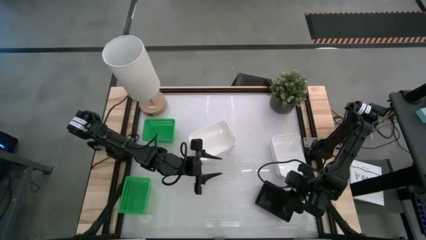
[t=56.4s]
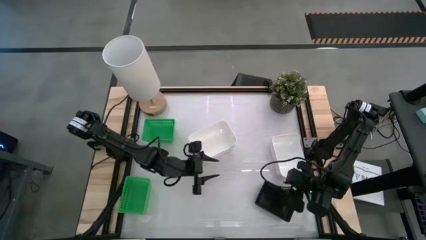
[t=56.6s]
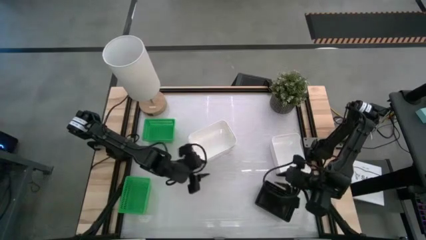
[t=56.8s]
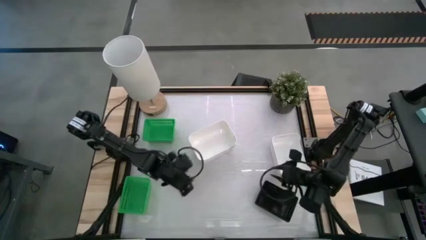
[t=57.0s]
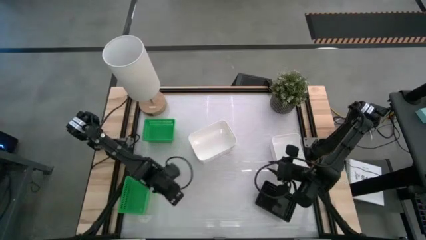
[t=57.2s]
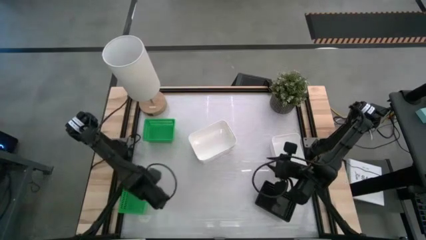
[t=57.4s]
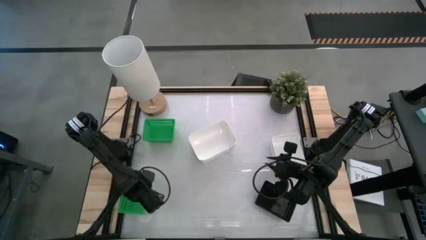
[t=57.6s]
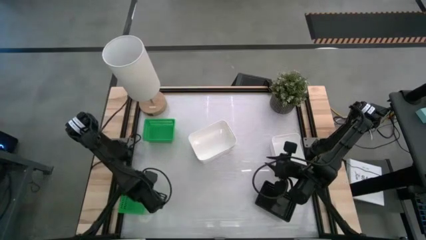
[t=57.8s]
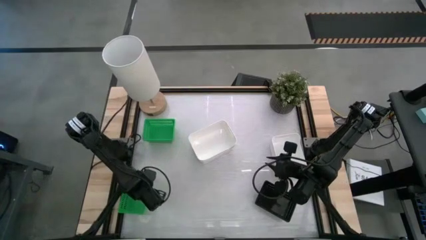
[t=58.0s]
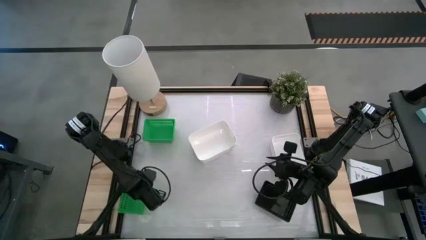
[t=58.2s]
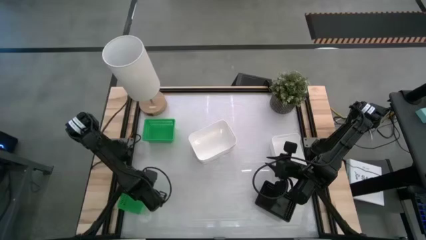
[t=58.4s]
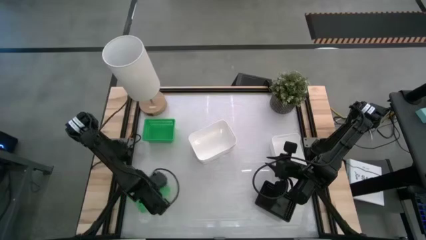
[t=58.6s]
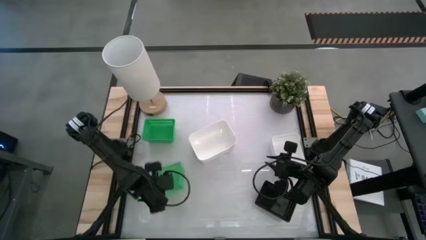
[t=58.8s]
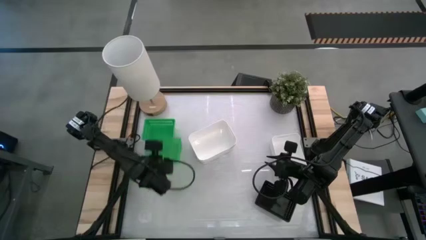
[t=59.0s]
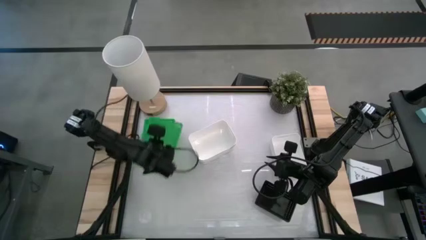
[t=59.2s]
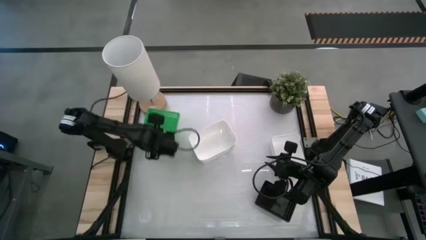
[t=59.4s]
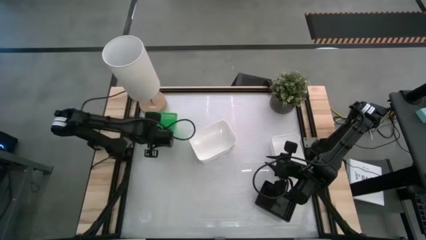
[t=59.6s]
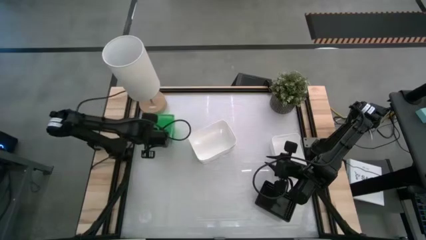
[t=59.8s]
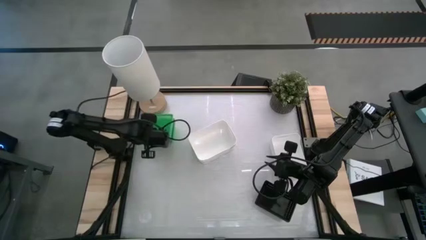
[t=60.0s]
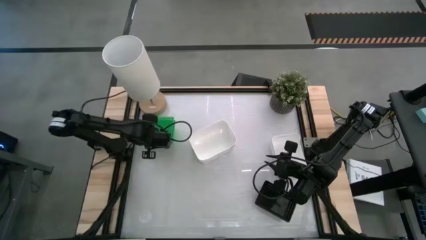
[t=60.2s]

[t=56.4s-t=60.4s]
Stack the bottom green bin on top of the green bin

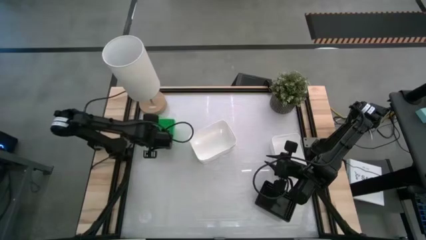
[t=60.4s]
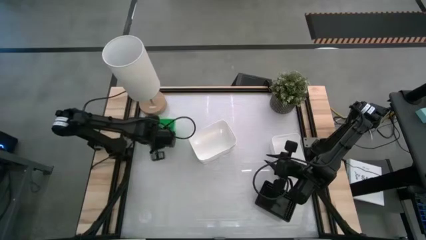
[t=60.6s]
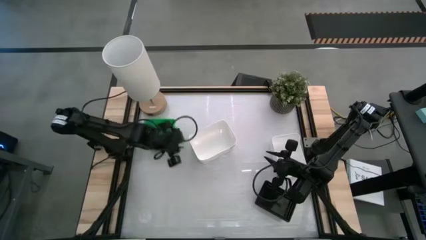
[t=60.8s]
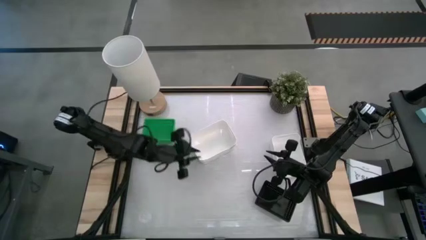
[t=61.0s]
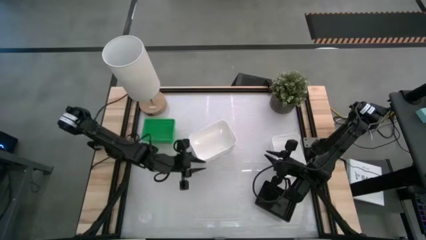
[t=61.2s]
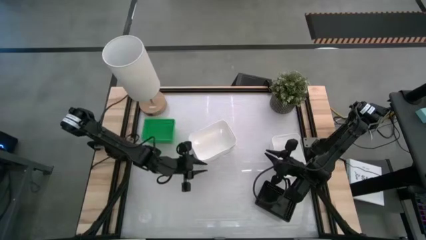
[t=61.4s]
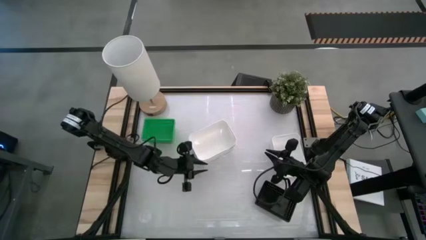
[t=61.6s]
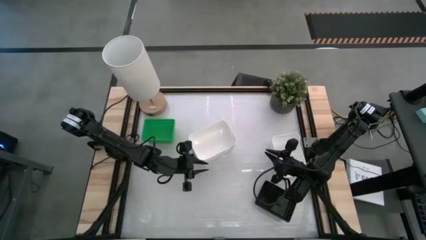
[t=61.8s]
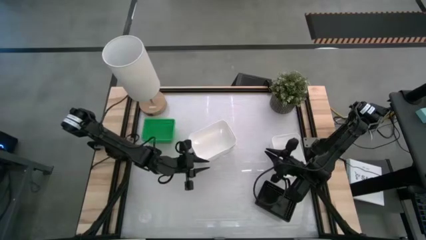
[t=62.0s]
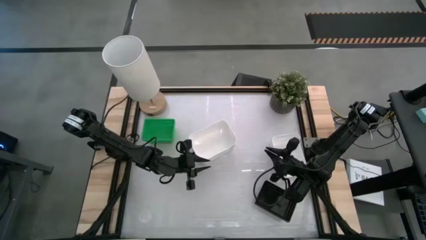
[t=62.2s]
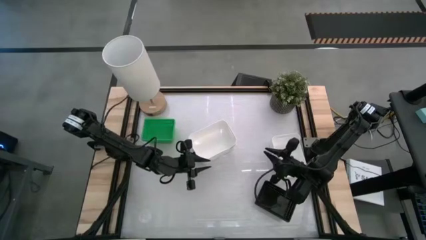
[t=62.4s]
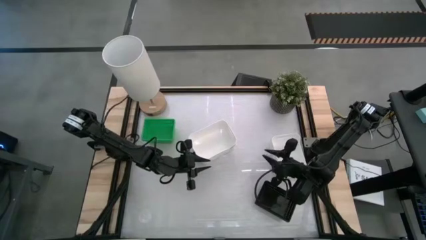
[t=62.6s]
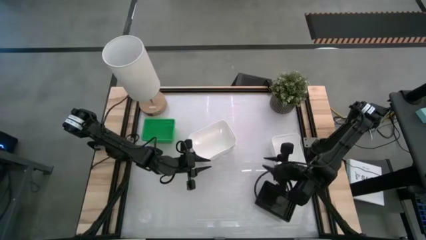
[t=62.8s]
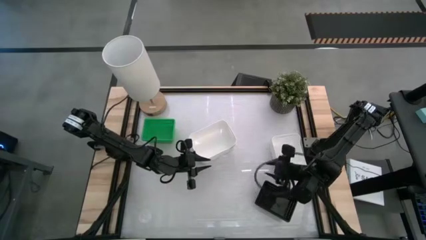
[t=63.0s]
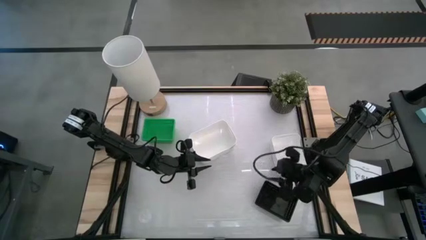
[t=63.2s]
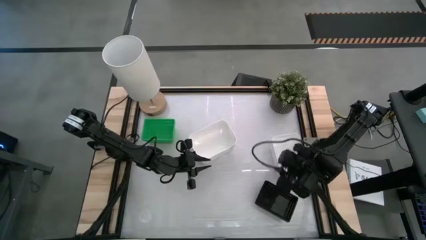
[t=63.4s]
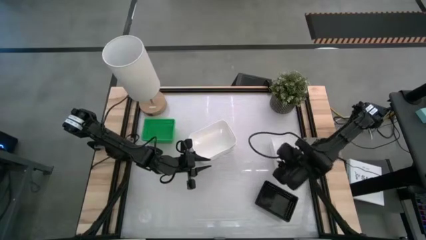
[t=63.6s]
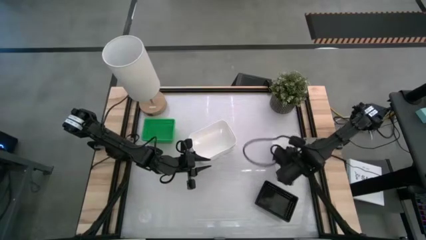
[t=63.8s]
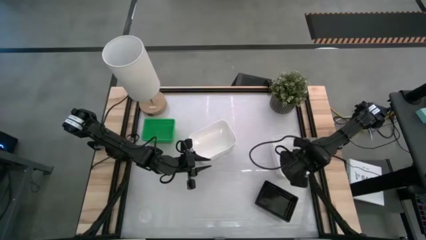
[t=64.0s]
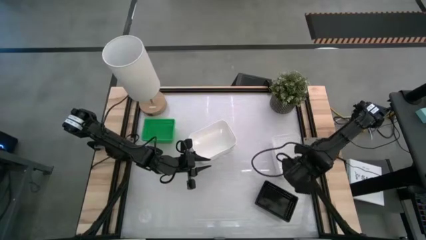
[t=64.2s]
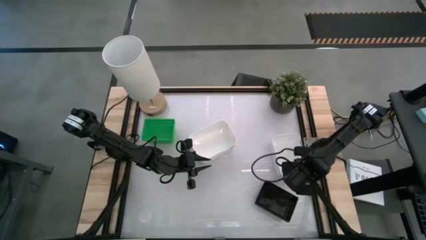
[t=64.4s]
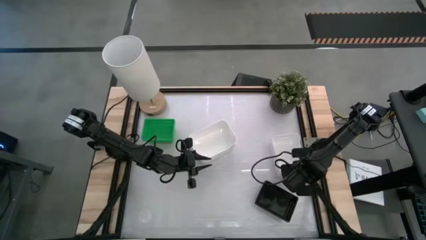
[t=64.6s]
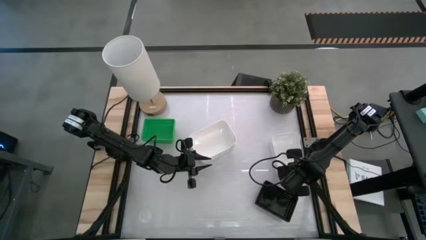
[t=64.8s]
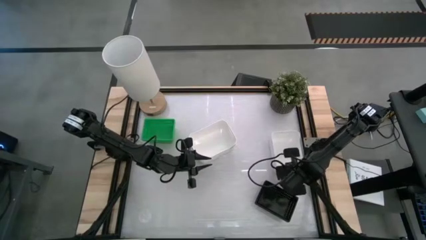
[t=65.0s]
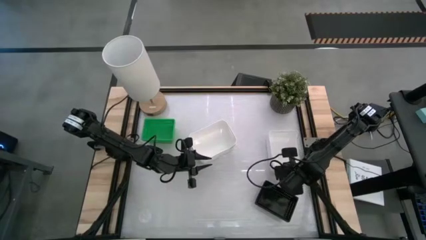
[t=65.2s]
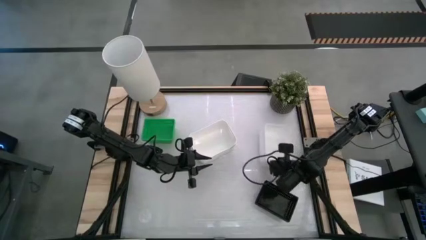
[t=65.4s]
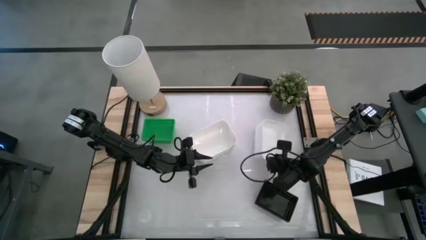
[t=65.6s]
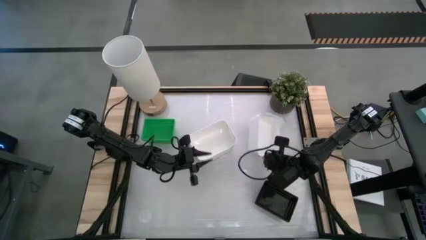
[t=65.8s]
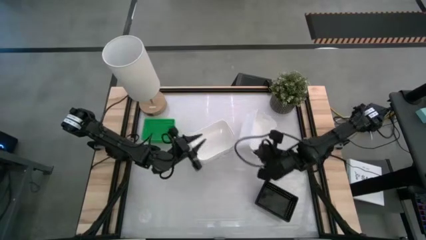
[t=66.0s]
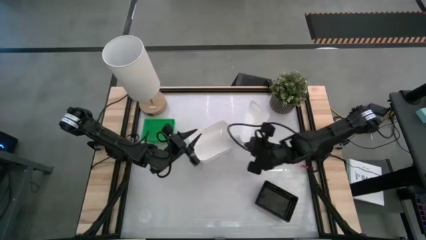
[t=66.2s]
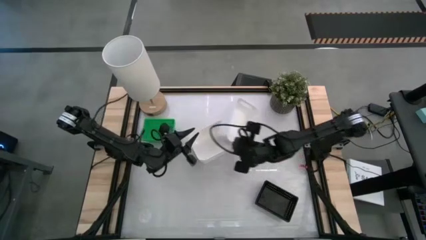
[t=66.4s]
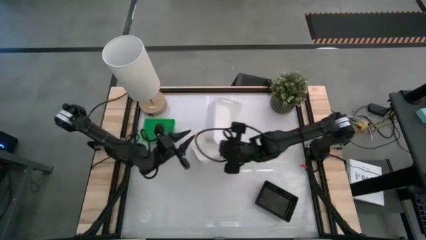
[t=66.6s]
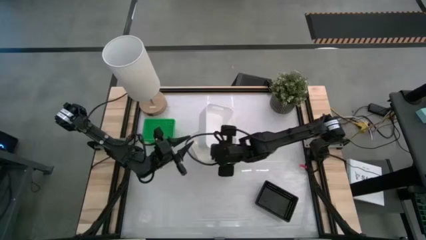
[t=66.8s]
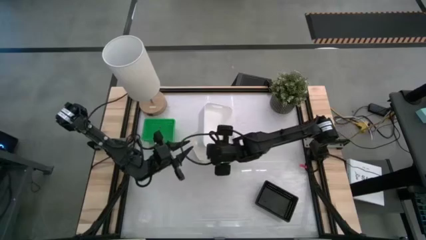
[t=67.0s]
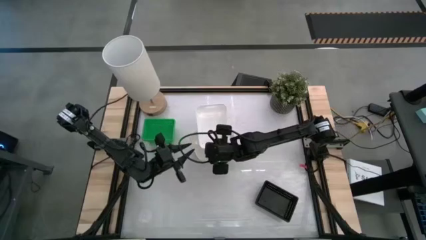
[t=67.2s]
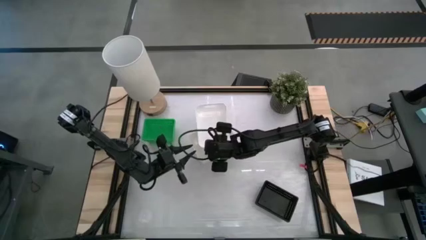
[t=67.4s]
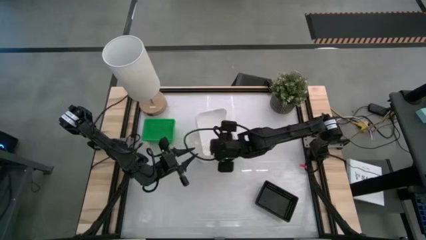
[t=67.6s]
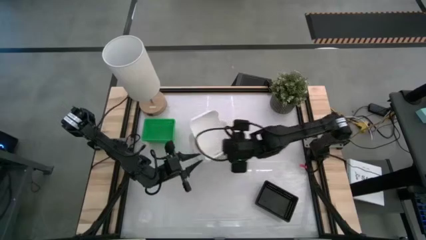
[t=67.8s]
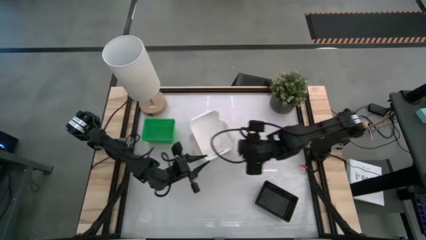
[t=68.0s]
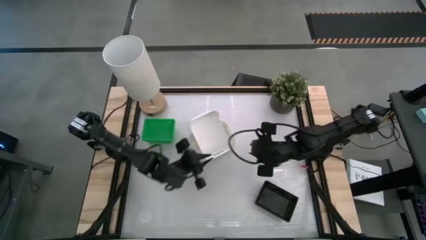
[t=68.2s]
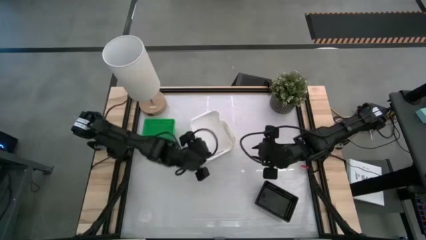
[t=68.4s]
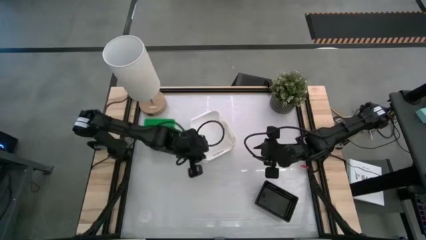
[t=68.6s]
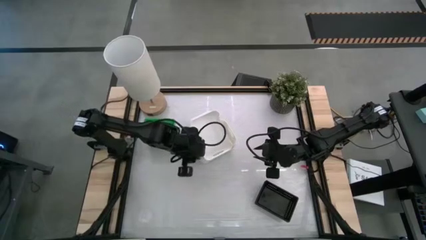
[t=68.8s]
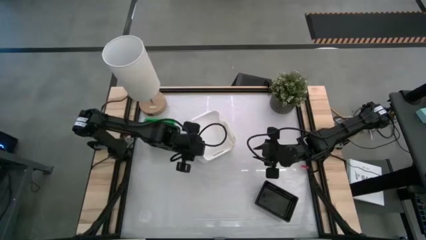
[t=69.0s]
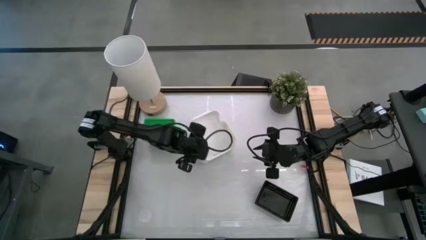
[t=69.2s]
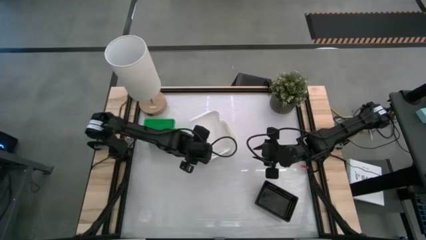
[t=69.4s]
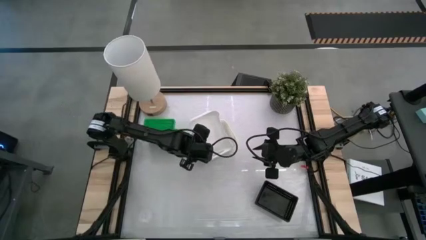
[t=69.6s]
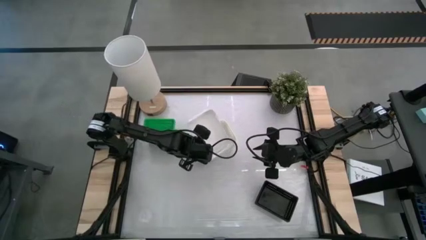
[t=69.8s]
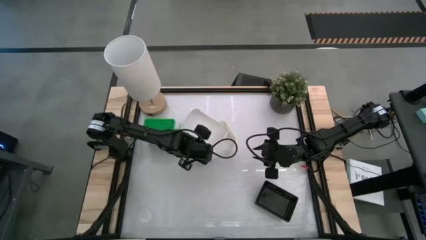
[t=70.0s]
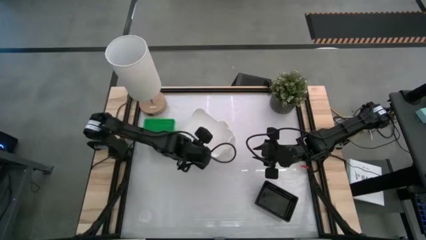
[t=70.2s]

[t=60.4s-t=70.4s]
Stack the right white bin on top of the white bin
